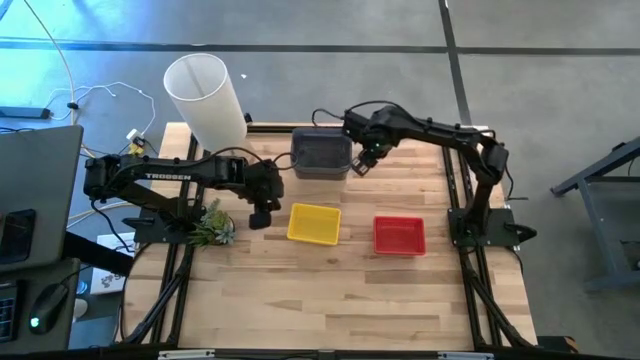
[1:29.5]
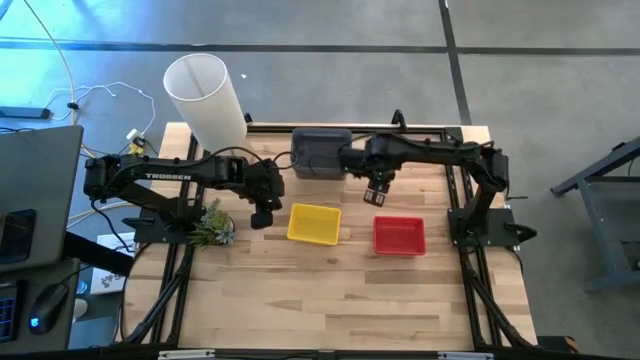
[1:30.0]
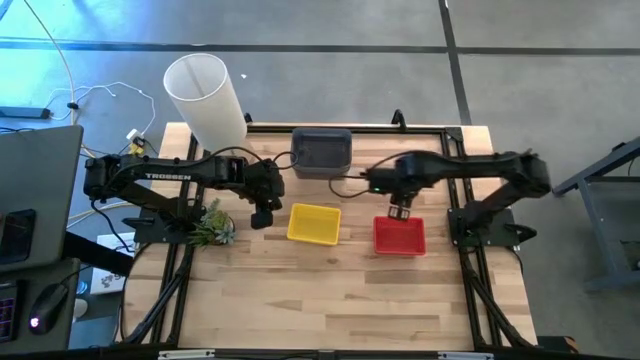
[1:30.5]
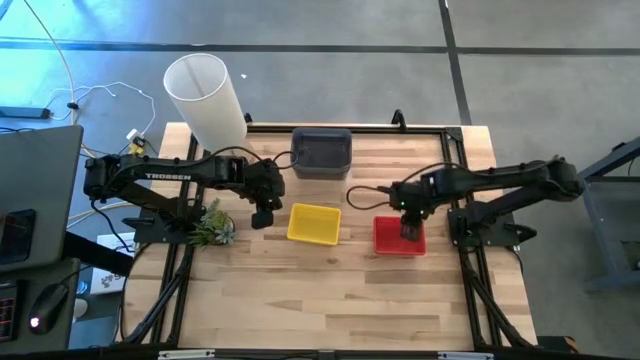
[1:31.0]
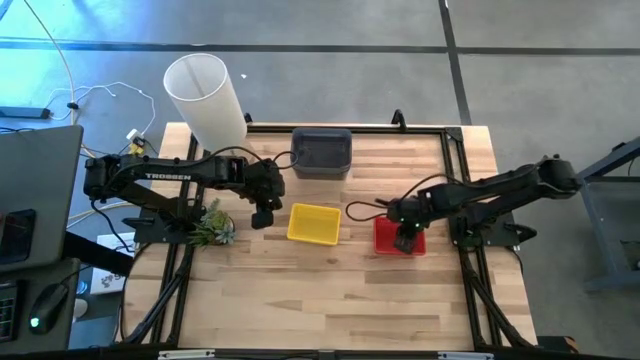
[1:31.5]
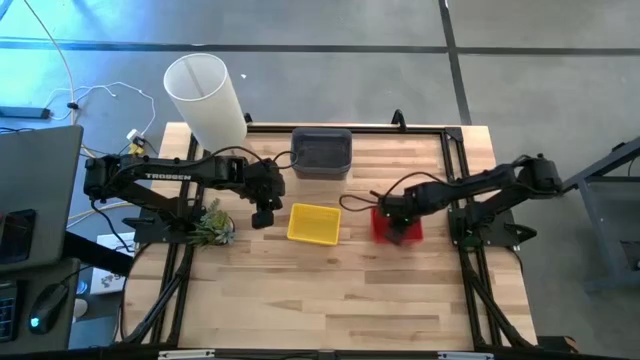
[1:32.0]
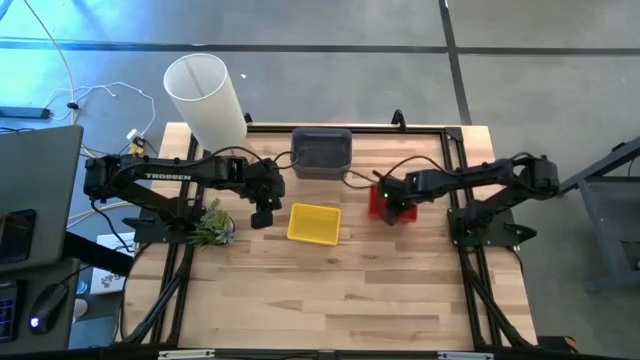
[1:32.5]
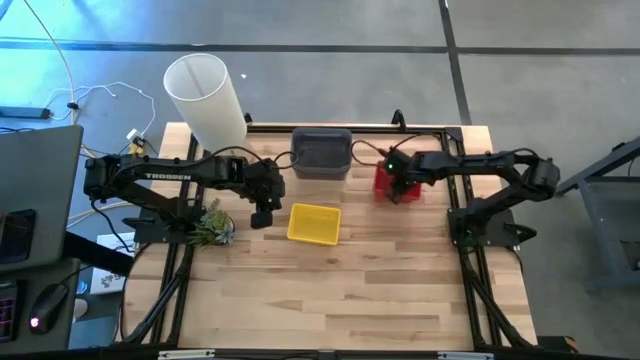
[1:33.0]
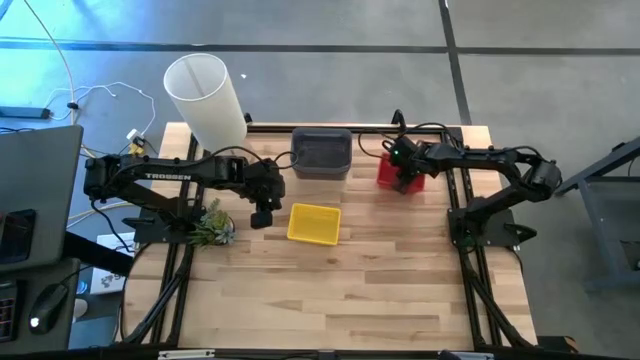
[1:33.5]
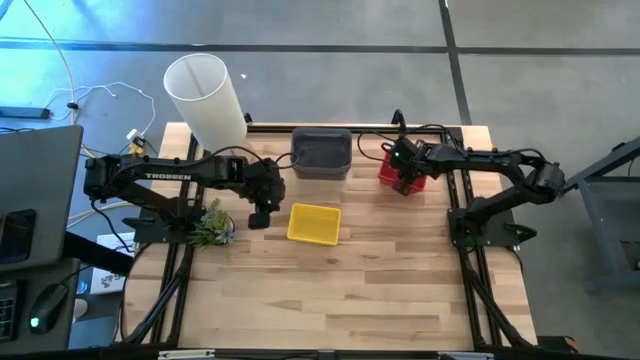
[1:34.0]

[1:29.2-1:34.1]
Move the stacked red bin to the top right of the table

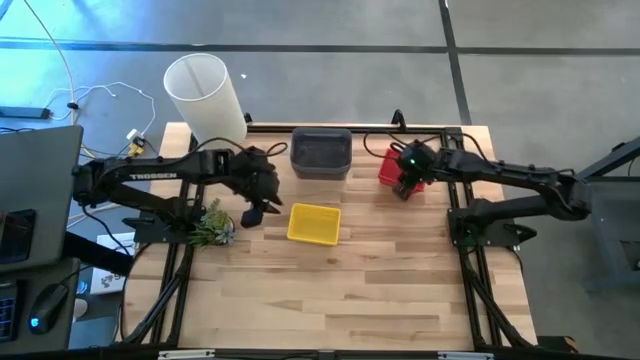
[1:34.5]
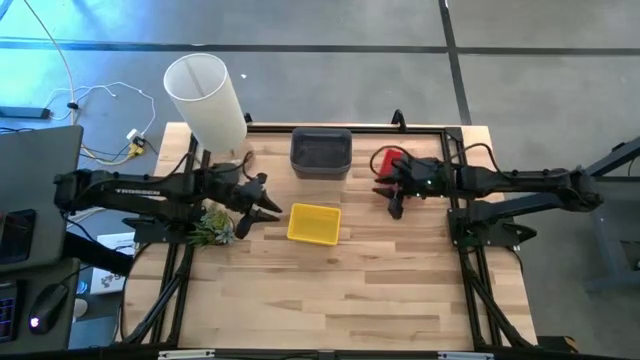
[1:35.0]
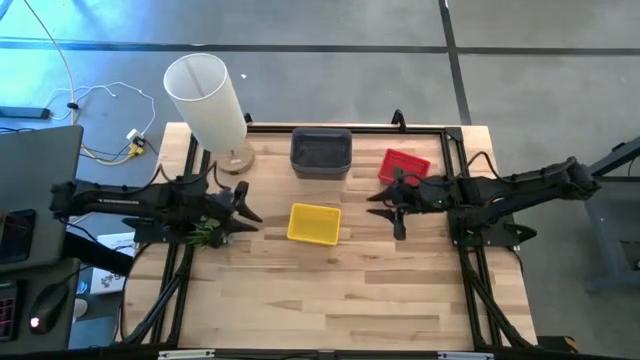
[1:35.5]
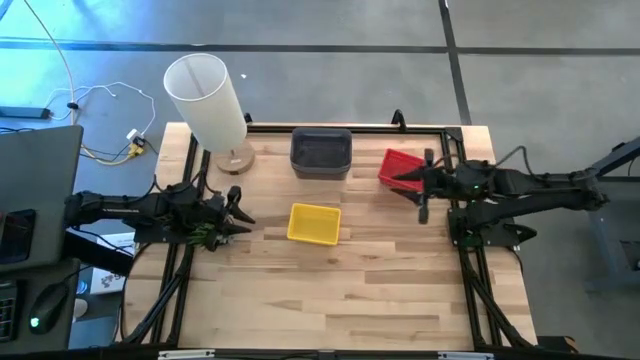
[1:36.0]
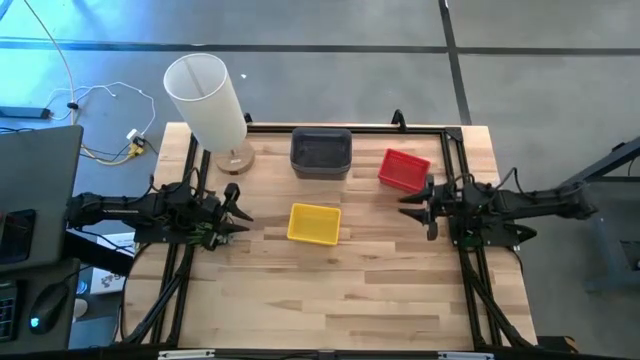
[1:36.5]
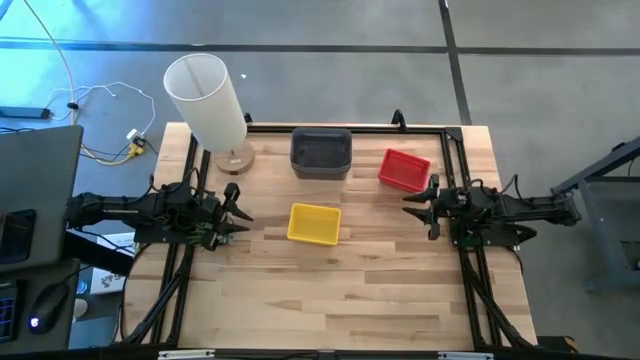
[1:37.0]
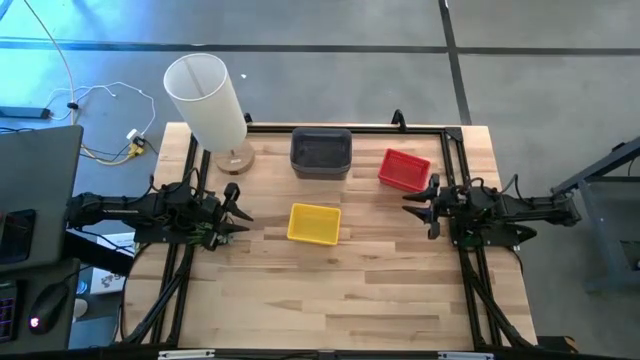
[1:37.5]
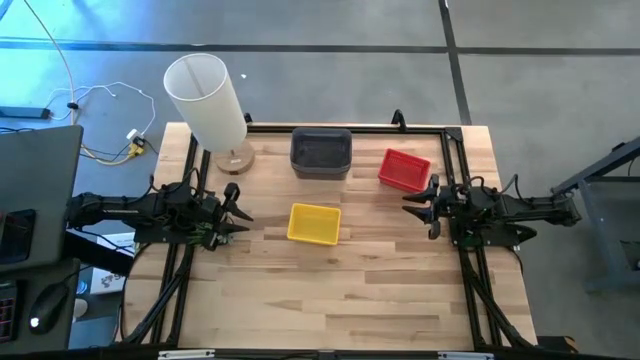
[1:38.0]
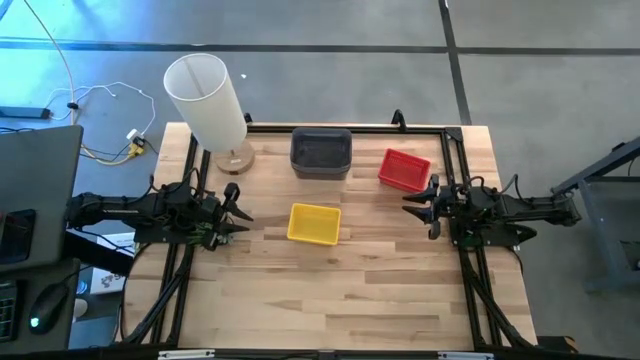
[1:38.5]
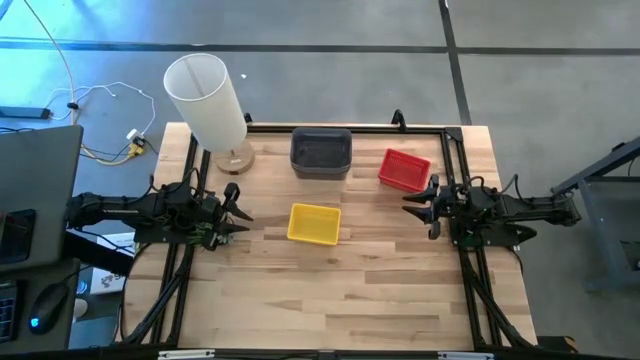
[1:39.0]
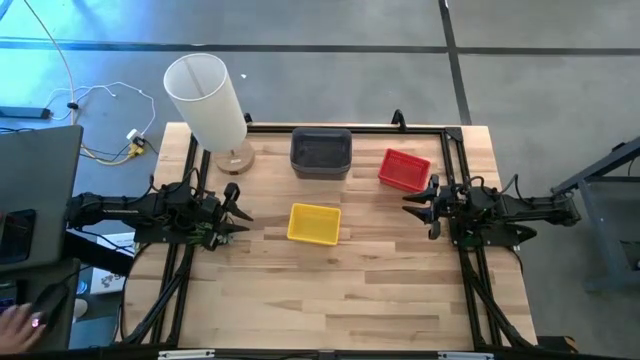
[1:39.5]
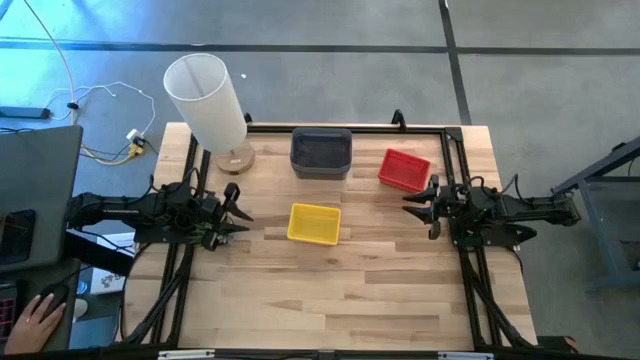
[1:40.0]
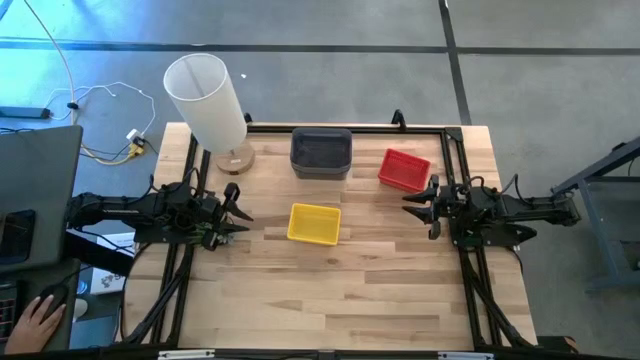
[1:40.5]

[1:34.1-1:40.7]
Return to Home Position
